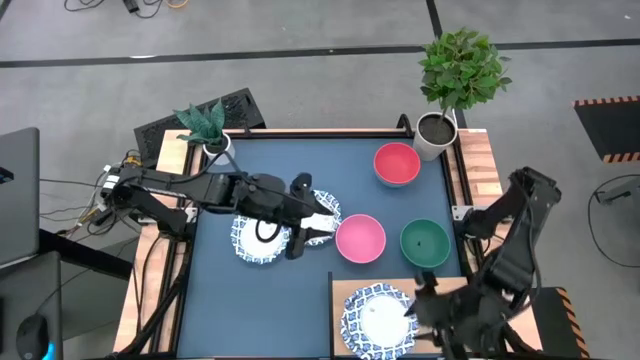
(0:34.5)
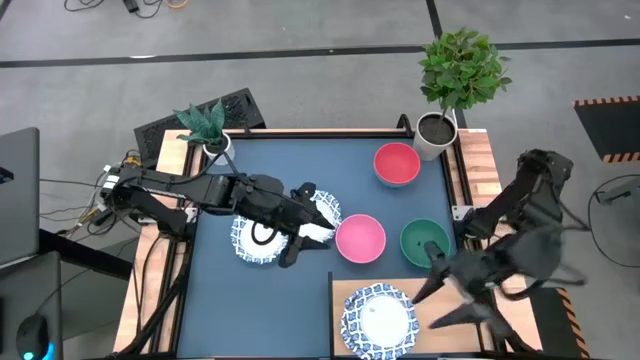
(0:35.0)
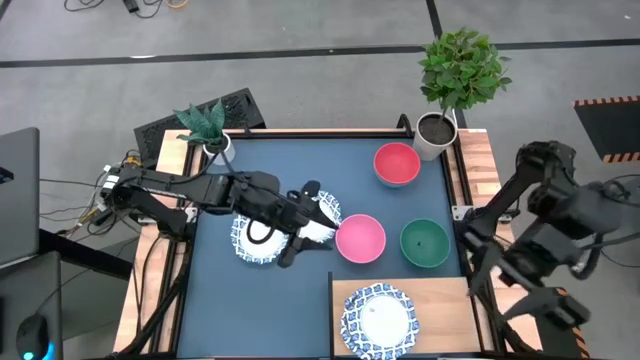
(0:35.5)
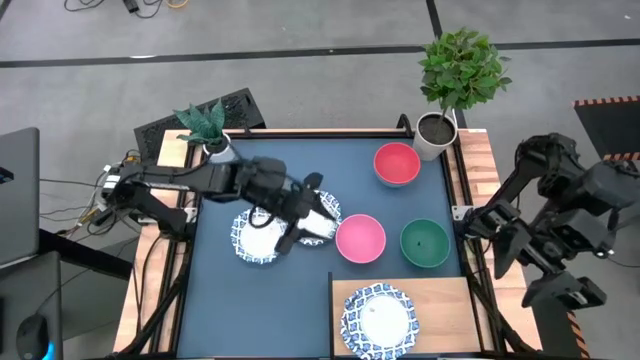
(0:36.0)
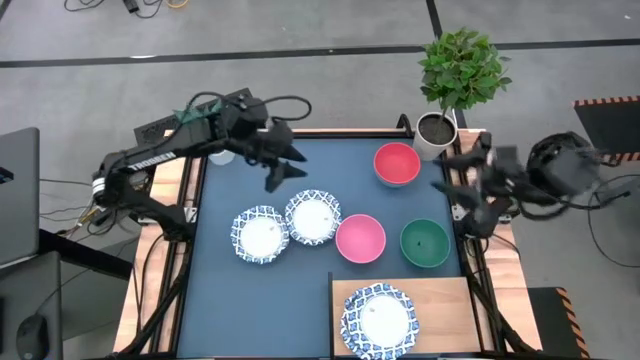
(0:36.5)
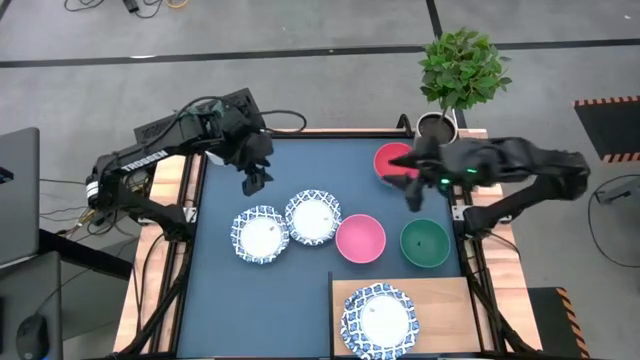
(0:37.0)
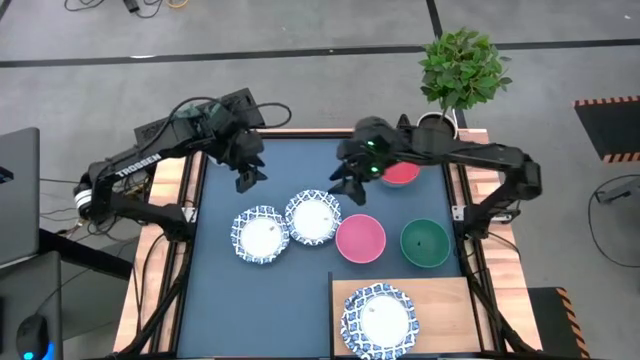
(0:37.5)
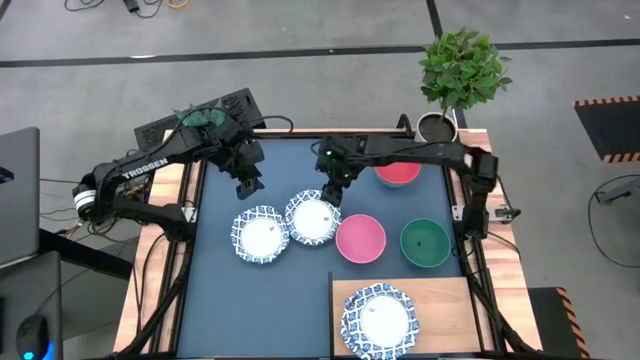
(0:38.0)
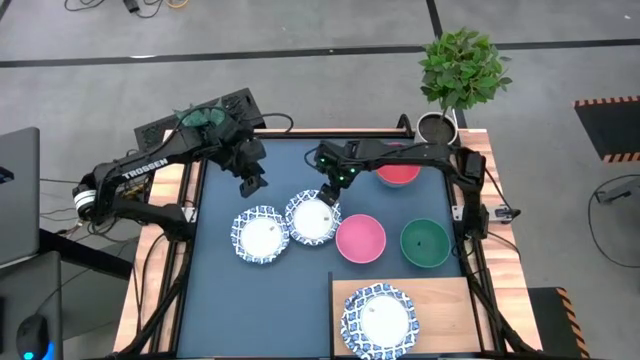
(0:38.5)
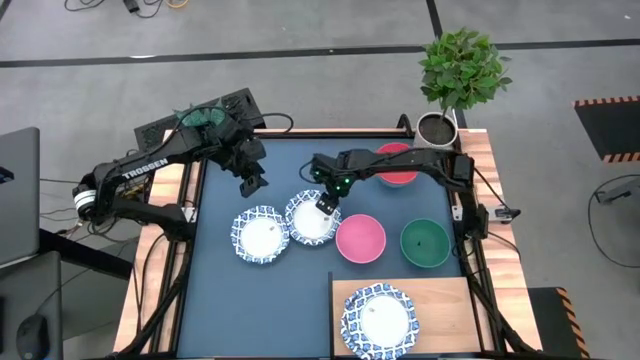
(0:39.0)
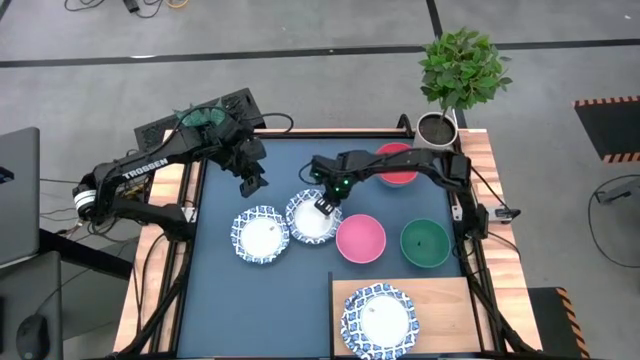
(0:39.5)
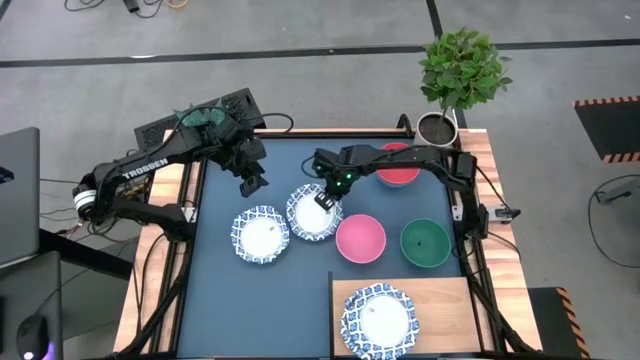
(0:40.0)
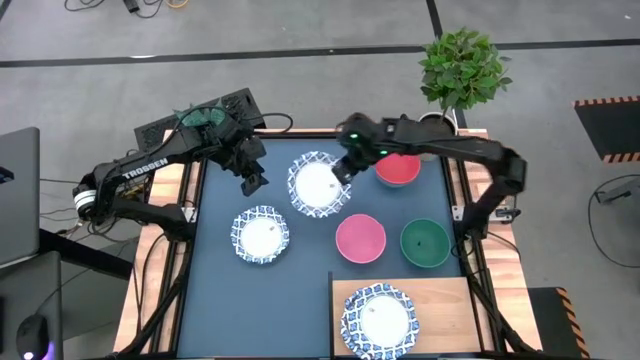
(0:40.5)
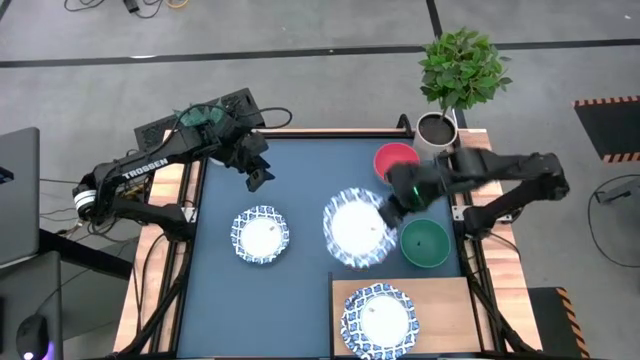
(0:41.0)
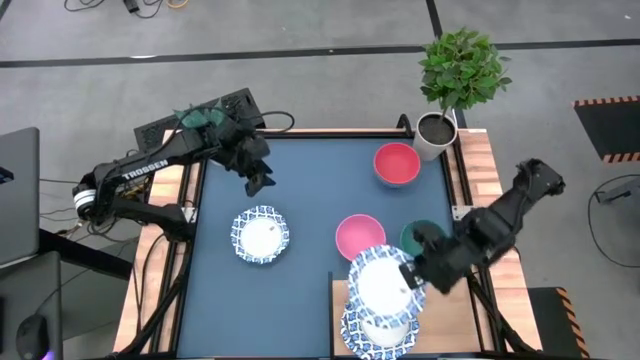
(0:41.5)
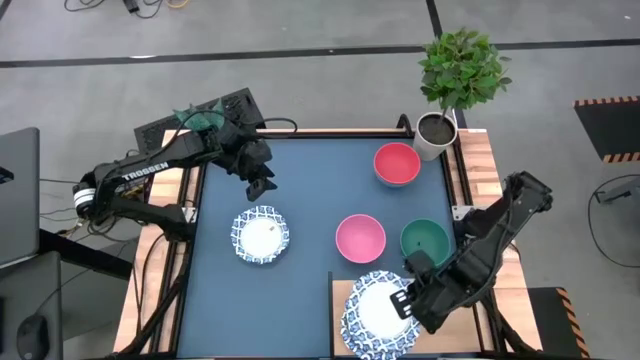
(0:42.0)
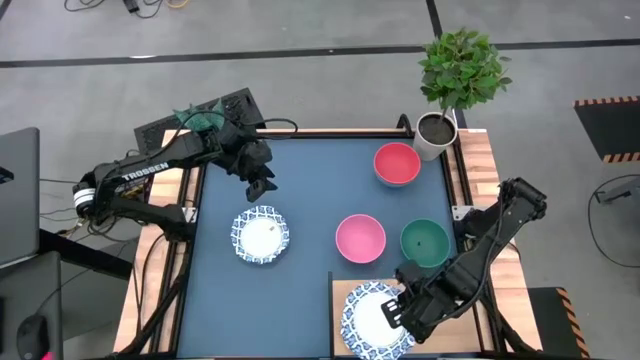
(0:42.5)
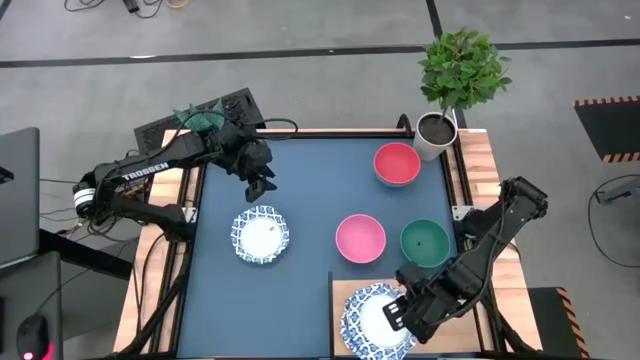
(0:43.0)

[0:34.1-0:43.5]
Task: Place and stack bowls onto a shelf
Stack the white patterned bowl on the white patterned bowl on the shelf

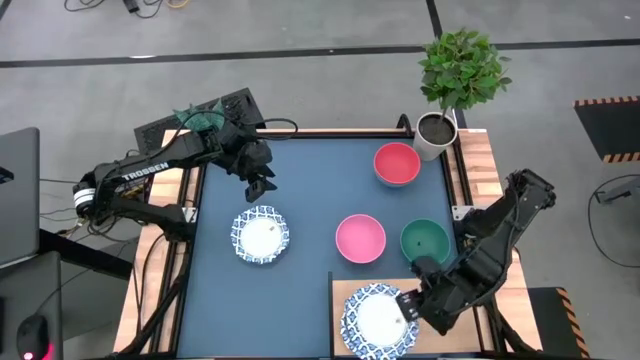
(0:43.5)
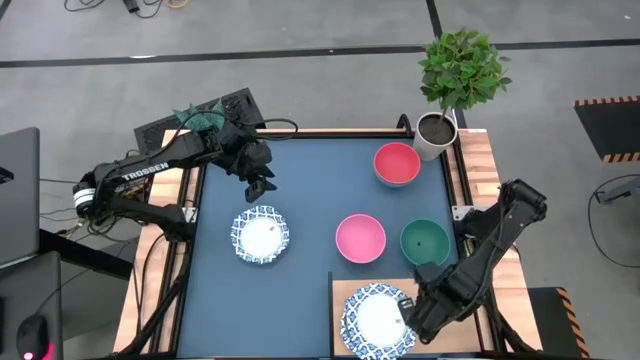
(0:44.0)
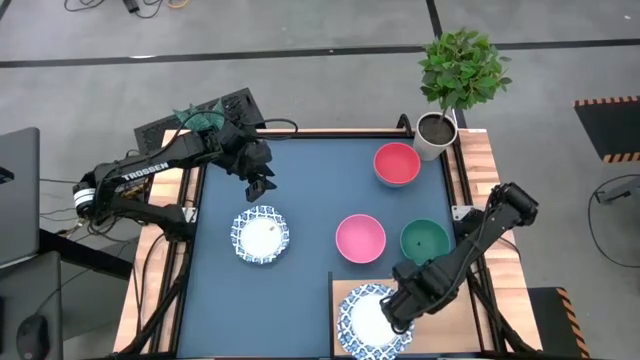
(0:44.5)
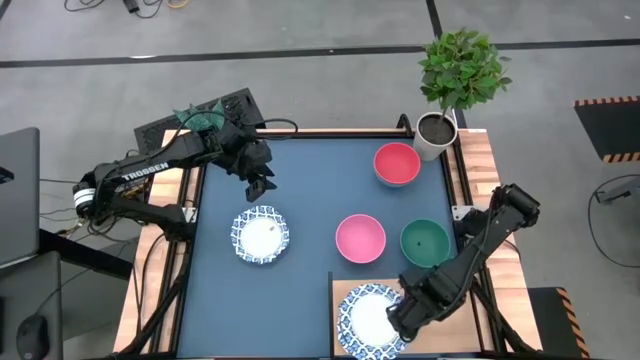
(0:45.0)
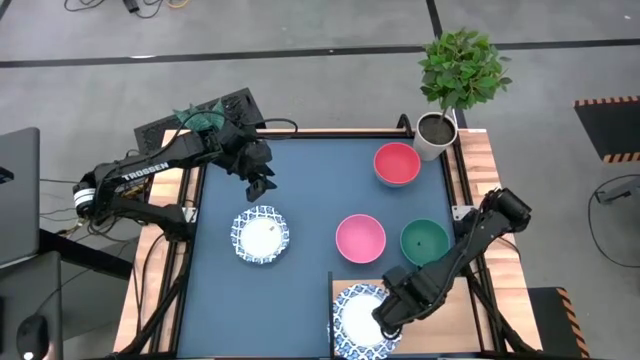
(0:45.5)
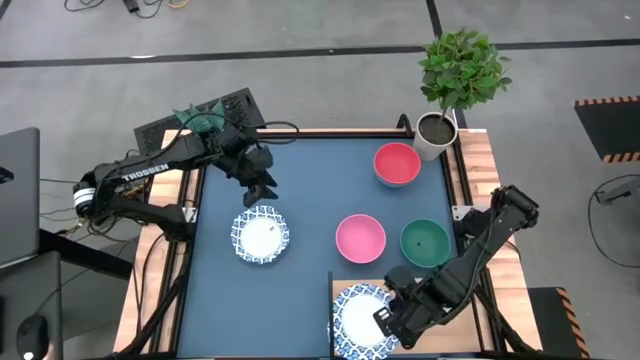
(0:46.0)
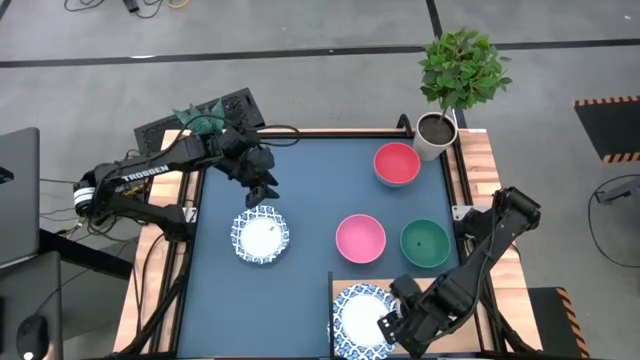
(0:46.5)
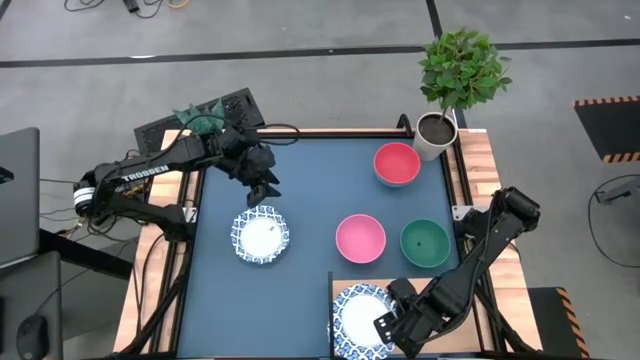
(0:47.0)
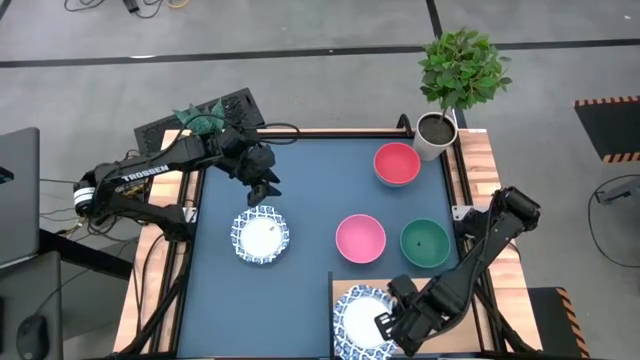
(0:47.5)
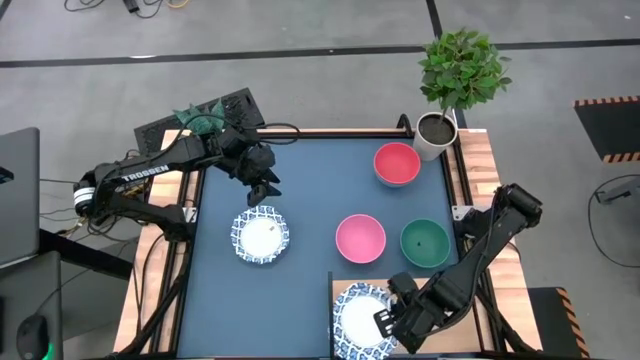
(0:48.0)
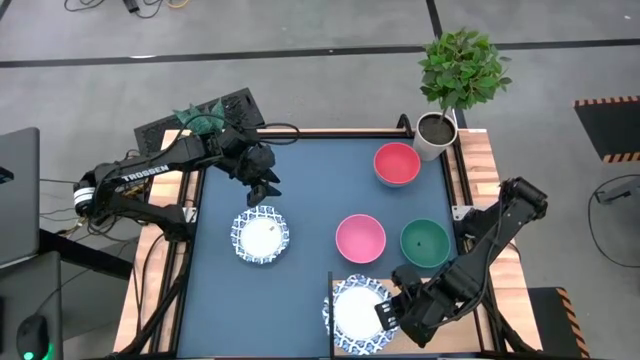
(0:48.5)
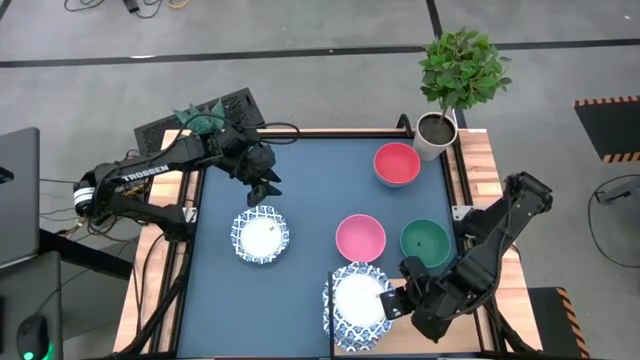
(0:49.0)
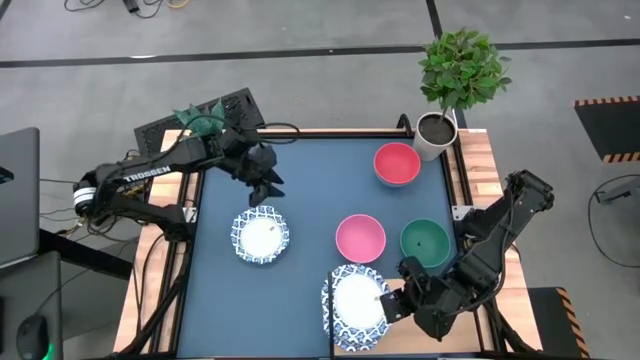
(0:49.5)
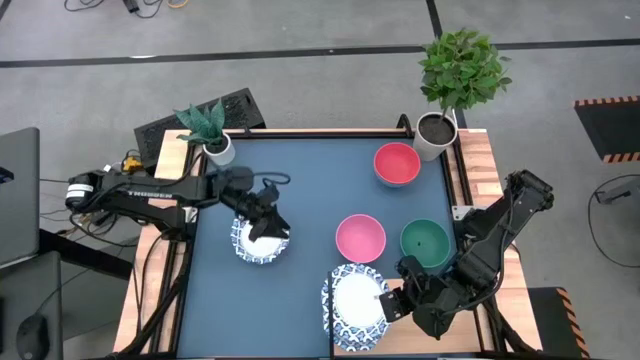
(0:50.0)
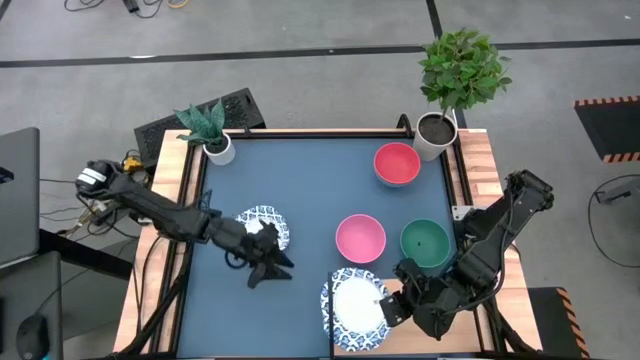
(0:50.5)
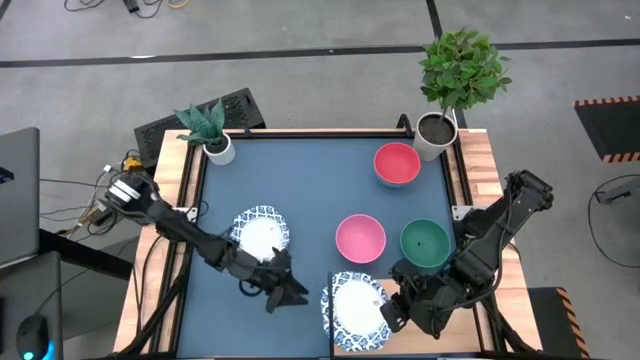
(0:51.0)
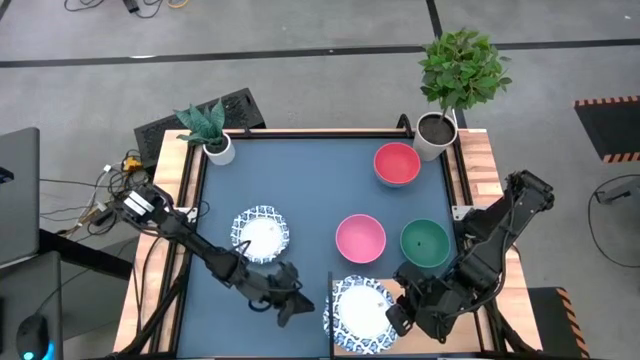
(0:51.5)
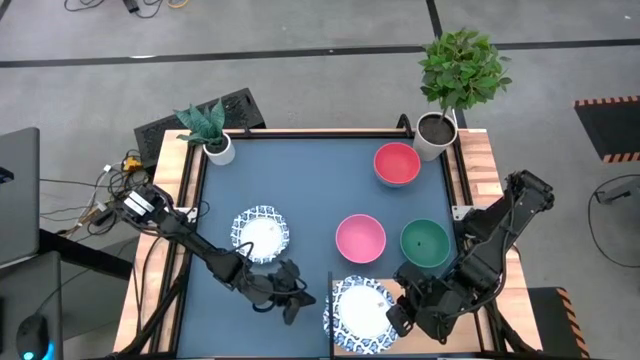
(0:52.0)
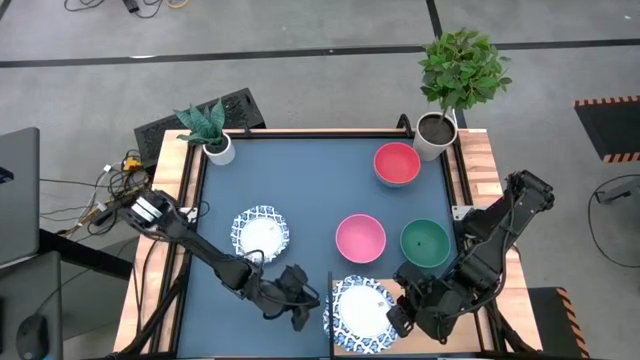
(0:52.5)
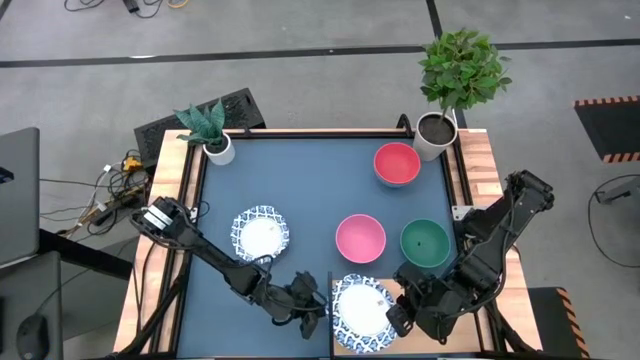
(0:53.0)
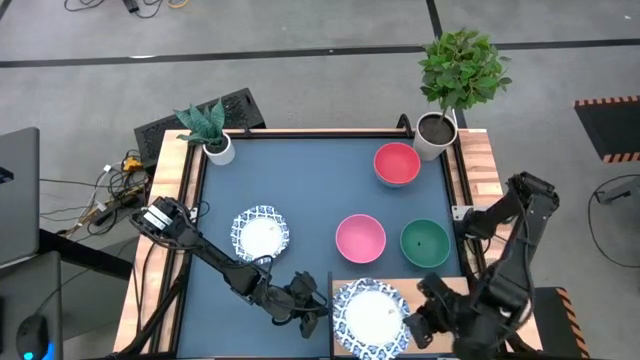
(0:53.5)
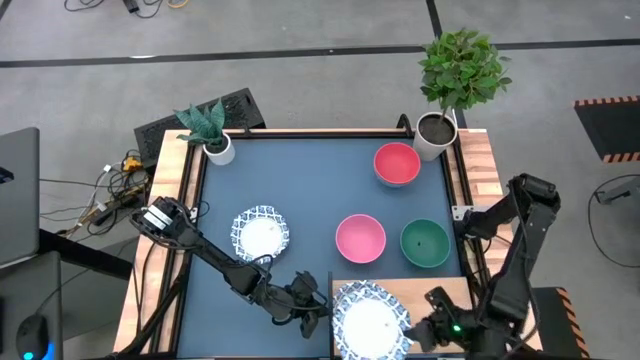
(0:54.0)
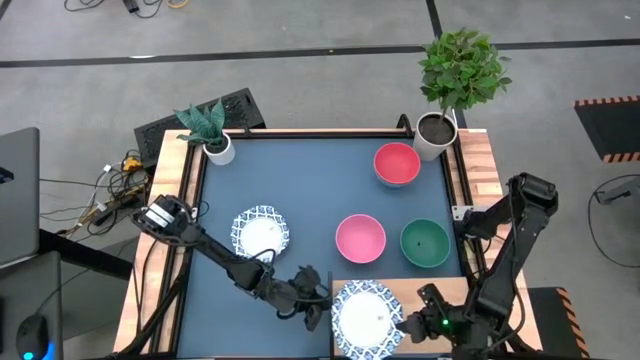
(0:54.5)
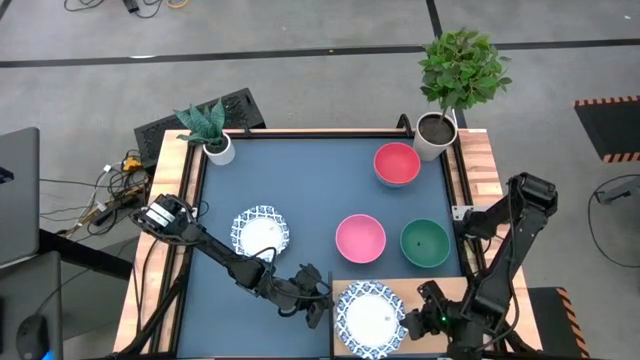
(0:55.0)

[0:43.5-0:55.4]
Adjust the stacked white patterned bowls on the shelf
